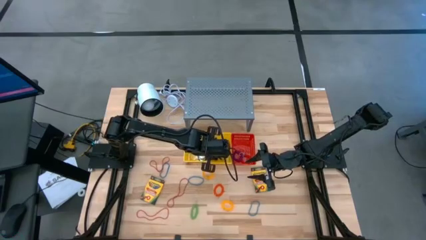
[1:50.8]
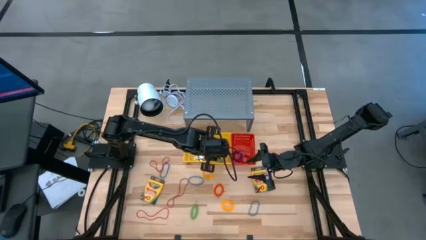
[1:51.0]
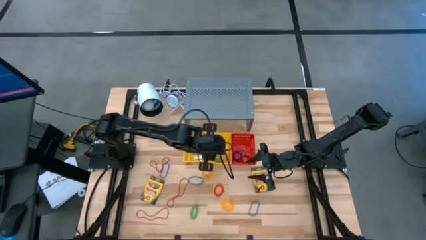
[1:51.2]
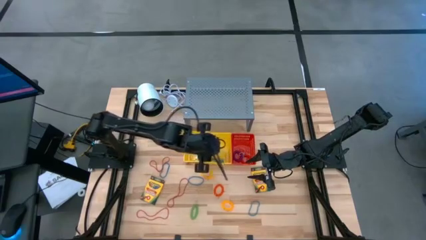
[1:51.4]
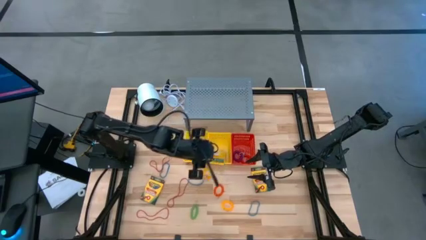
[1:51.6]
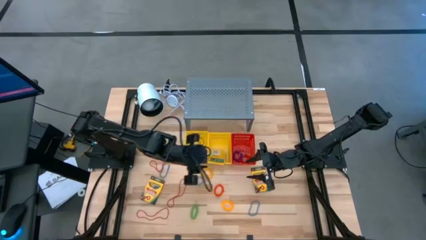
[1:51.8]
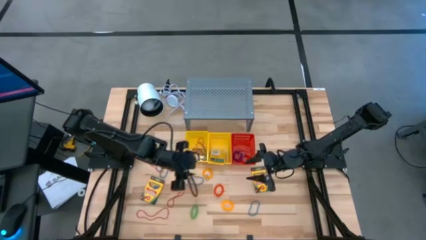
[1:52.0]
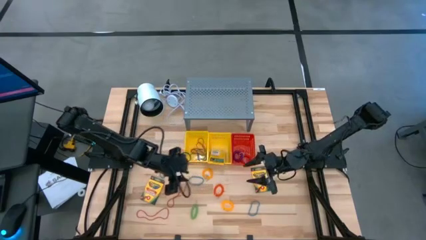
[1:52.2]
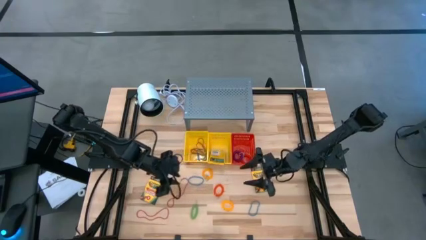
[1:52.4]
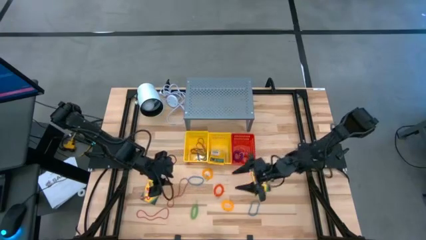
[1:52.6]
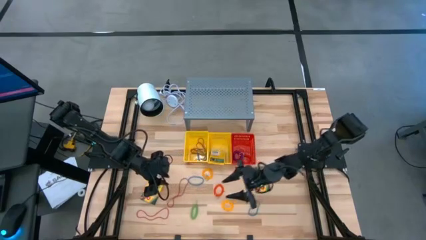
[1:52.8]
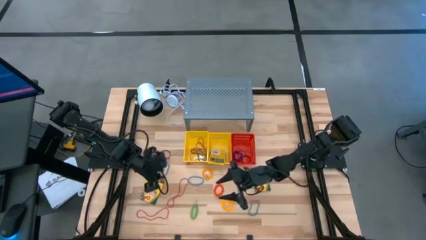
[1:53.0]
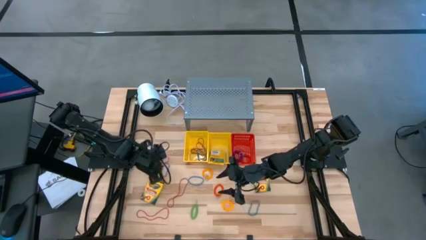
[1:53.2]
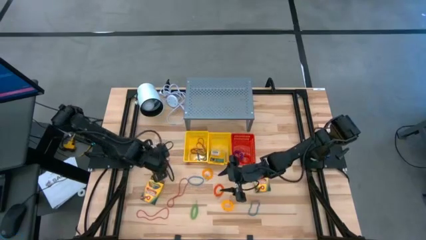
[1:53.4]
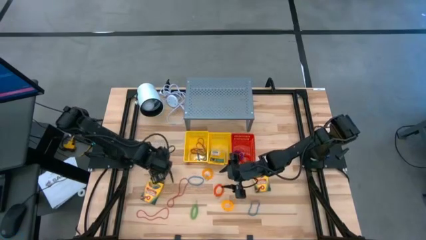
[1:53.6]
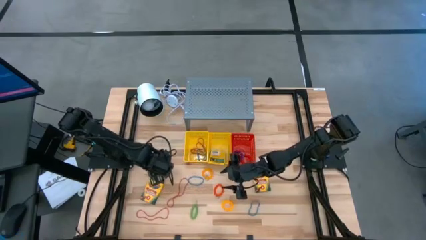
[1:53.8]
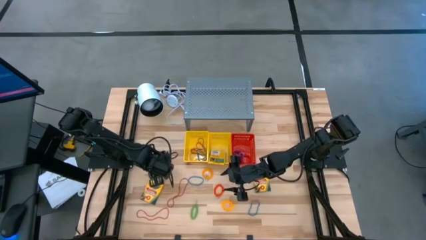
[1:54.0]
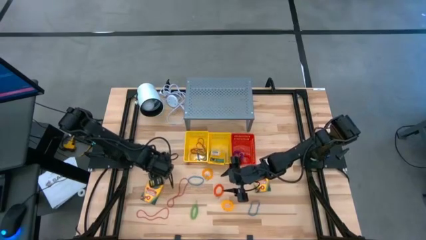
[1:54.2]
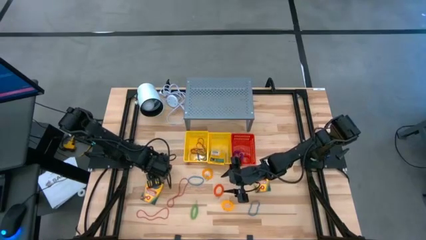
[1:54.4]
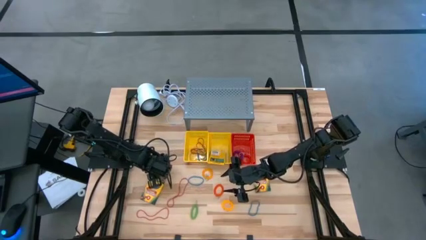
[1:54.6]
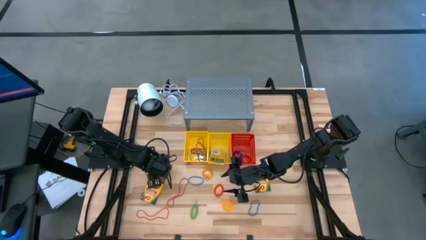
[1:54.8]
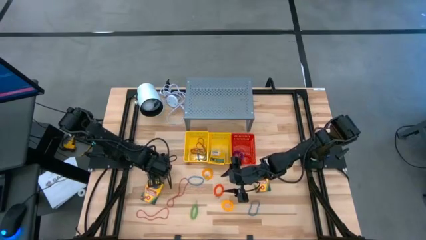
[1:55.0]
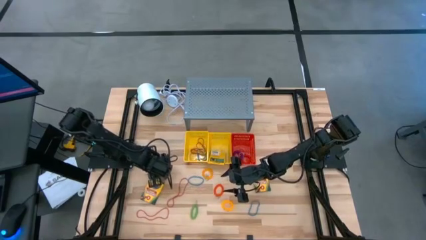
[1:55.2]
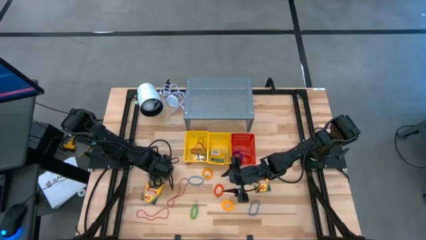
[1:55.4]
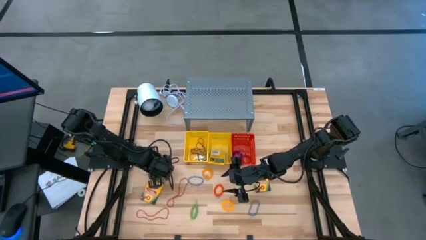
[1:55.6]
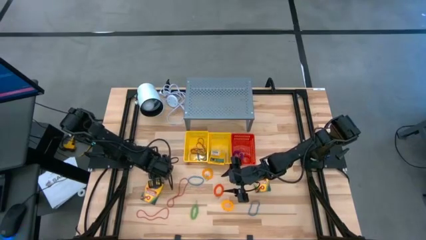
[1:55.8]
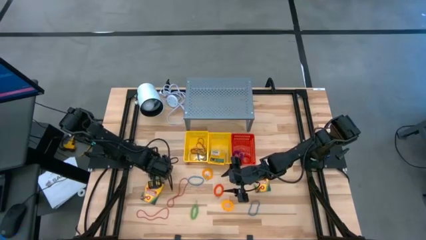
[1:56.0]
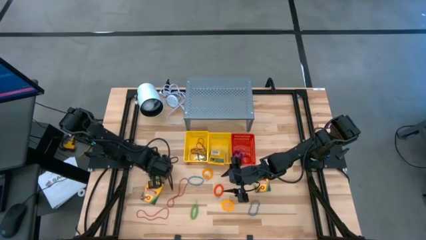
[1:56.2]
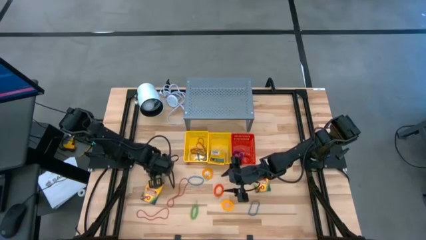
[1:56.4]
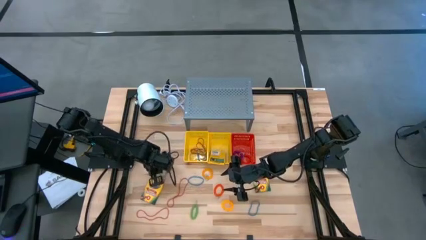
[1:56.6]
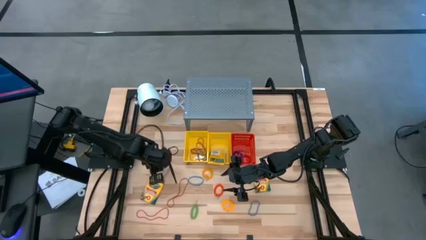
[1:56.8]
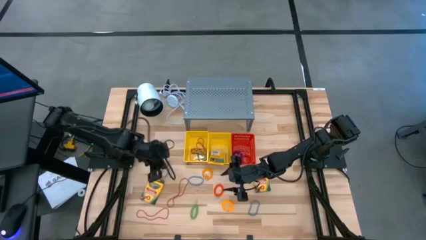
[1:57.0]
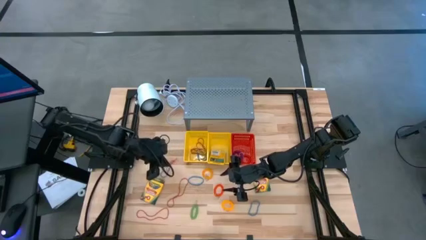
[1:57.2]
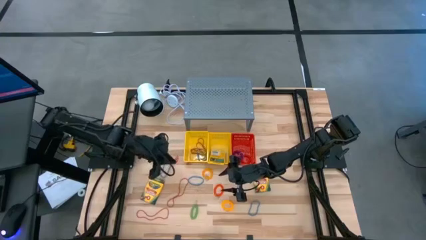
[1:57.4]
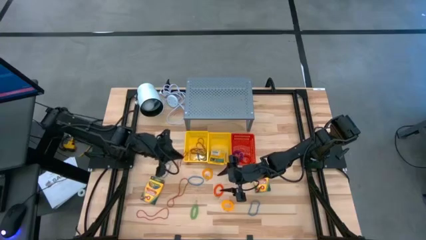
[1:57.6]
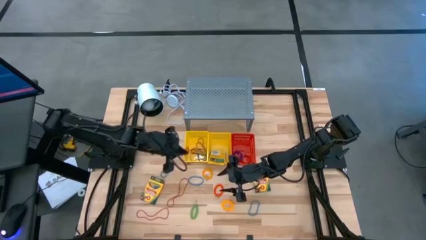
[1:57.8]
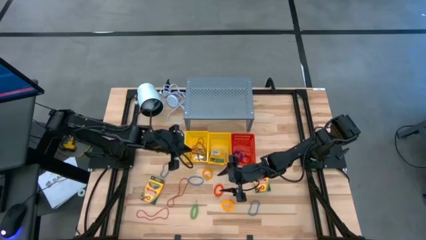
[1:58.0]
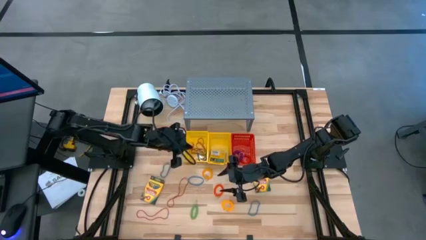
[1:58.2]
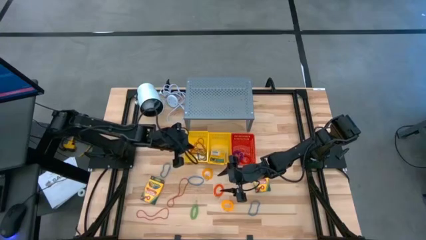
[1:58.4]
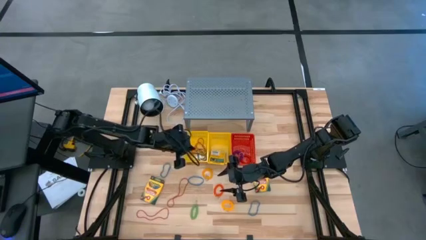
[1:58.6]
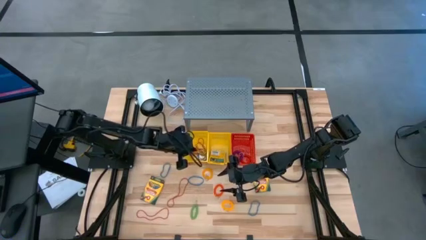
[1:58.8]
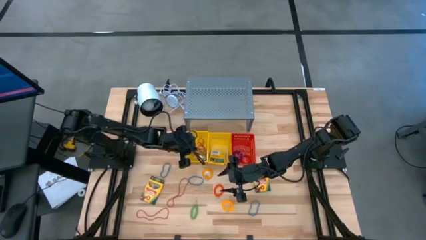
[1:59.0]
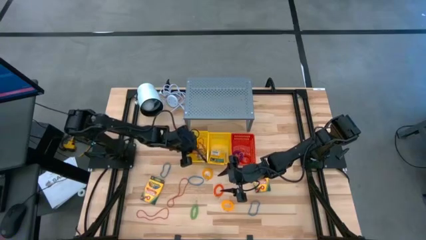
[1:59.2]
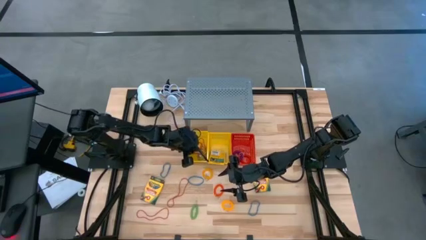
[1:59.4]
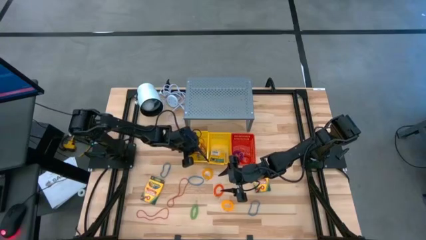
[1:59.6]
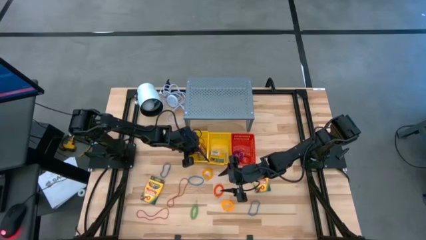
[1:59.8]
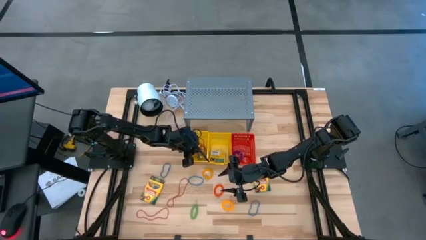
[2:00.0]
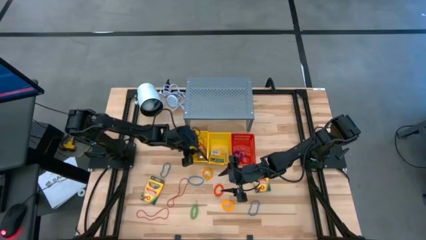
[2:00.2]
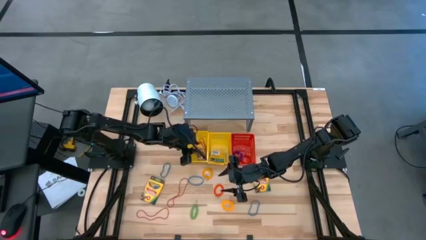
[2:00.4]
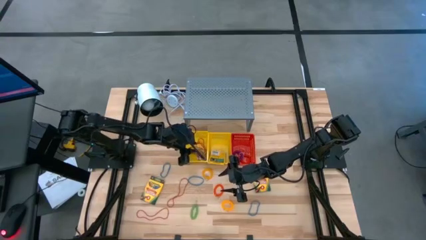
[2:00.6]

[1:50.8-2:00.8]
Task: Pick & Place Office Desk Supplies
Put the red rubber band into the left yellow basket

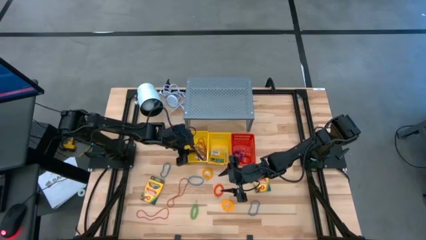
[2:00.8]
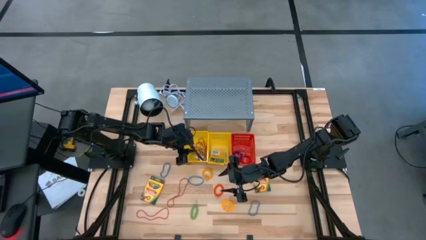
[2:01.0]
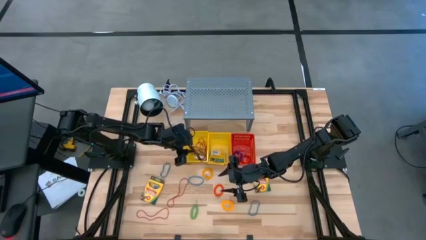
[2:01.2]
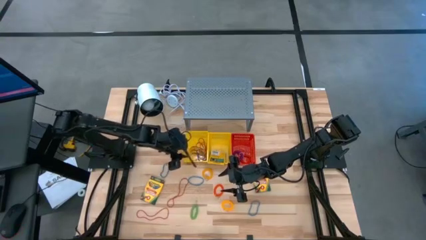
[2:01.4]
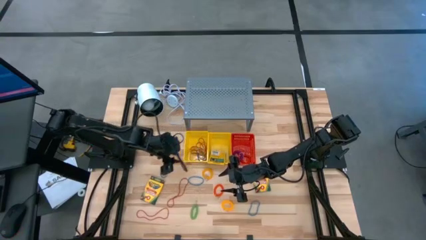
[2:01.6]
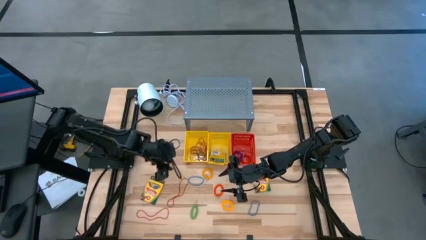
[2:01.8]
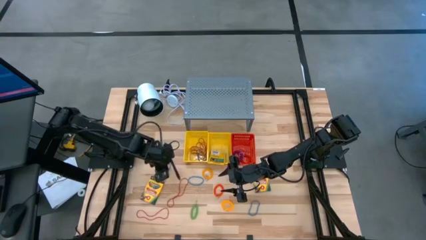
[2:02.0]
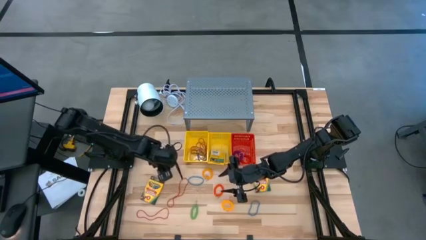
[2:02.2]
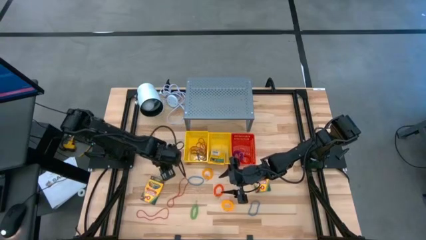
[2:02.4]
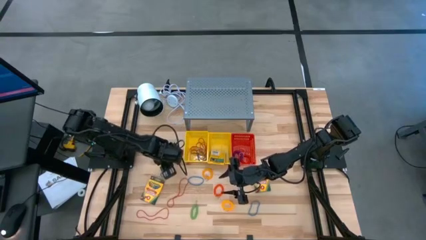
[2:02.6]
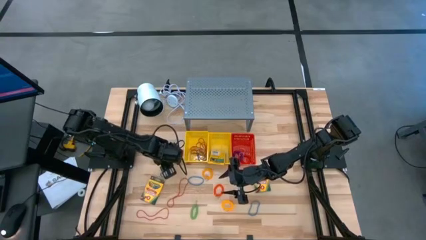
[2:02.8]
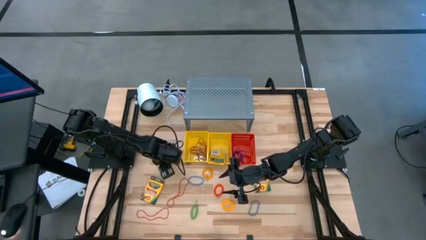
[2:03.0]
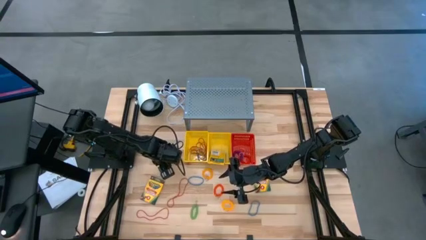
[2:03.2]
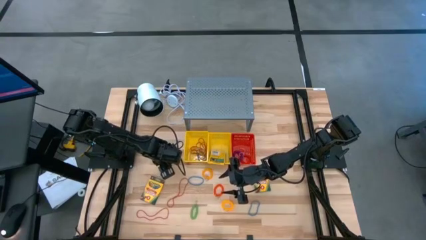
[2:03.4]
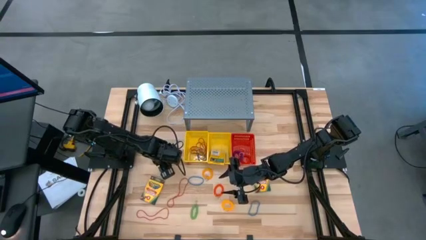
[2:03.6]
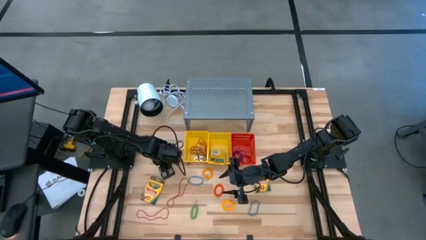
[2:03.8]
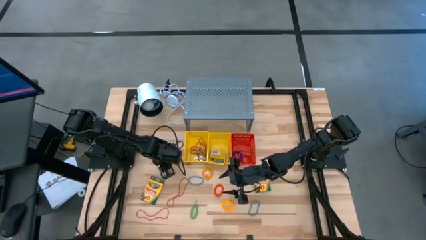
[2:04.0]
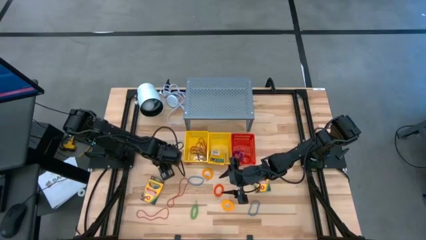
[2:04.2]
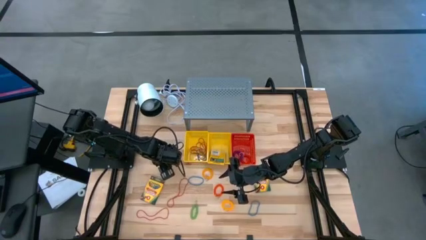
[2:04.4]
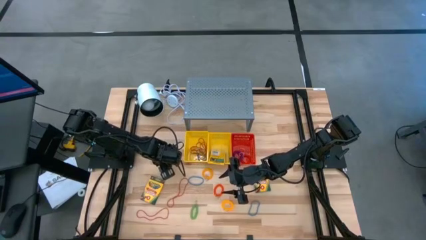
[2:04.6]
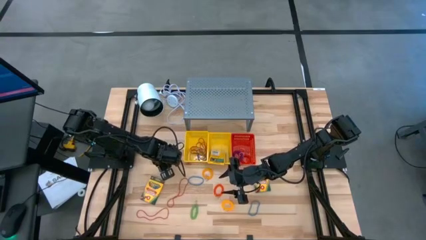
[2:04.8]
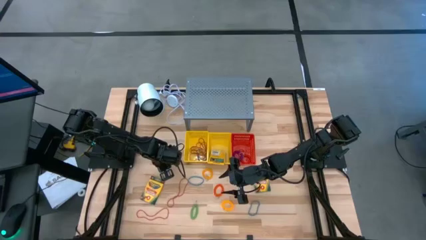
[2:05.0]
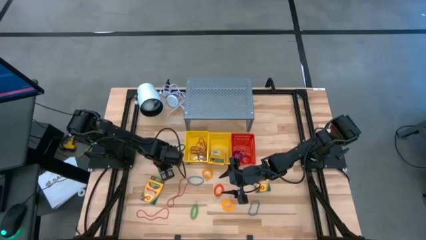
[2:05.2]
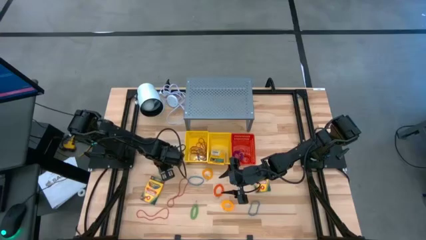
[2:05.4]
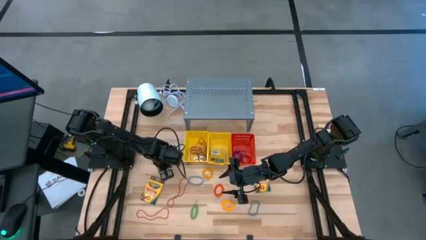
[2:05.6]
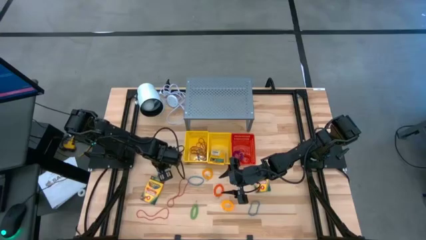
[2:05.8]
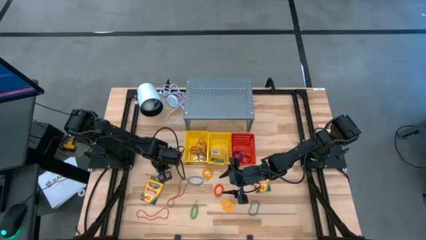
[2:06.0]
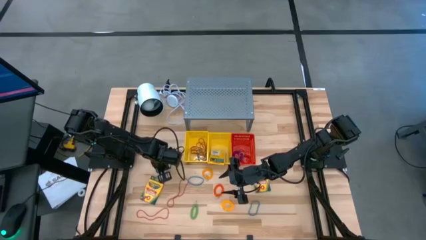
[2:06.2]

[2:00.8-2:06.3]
Put the blue rubber band into the left yellow basket
